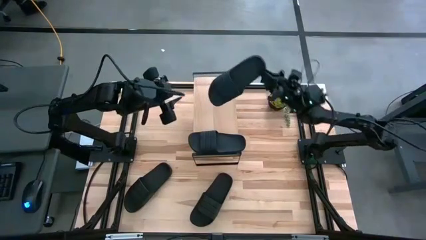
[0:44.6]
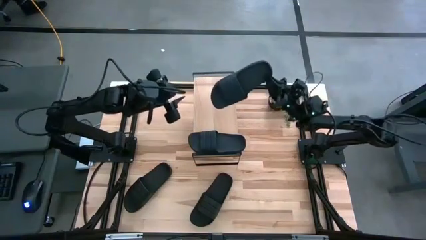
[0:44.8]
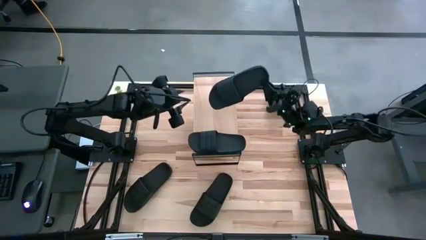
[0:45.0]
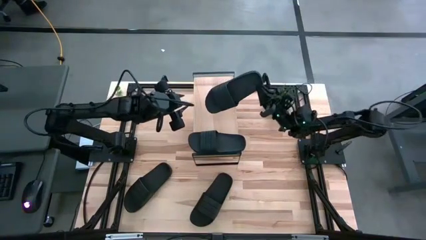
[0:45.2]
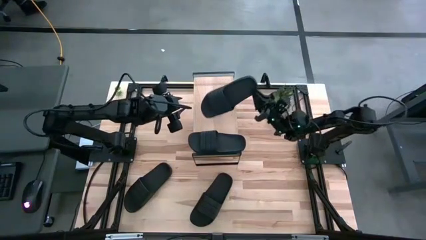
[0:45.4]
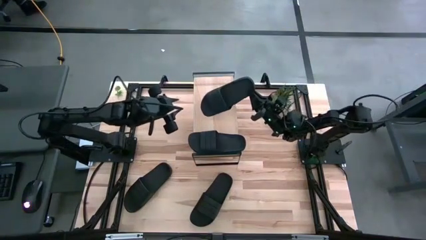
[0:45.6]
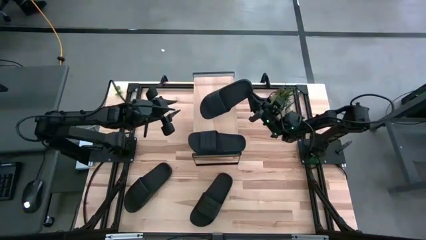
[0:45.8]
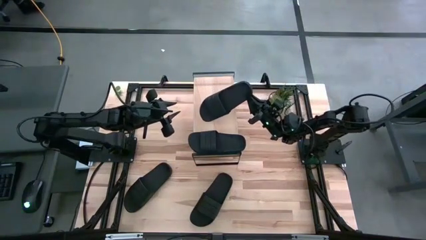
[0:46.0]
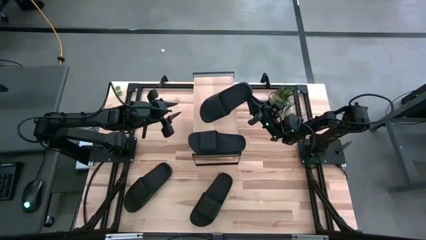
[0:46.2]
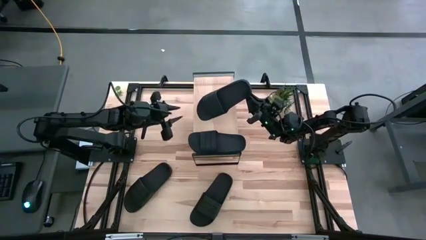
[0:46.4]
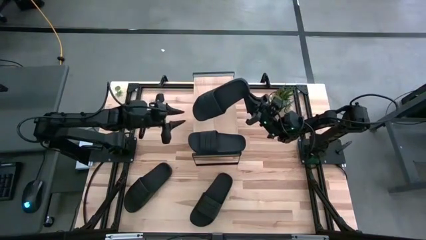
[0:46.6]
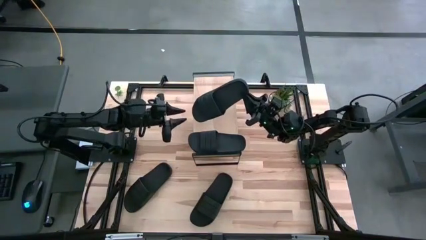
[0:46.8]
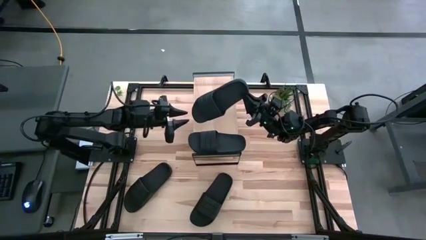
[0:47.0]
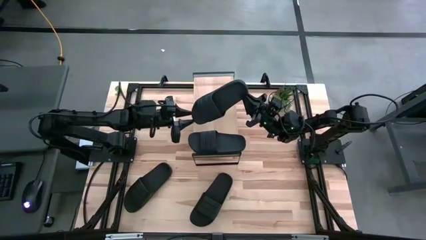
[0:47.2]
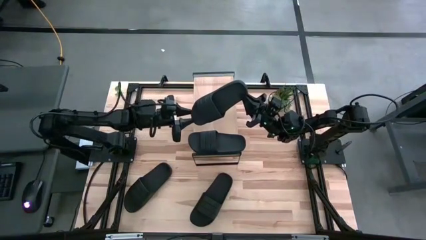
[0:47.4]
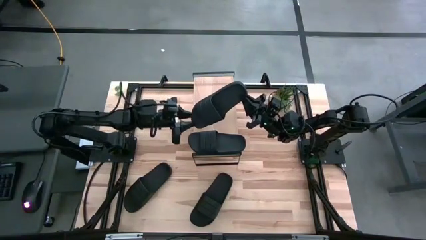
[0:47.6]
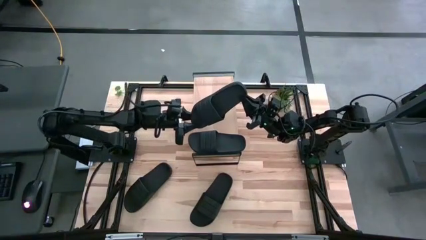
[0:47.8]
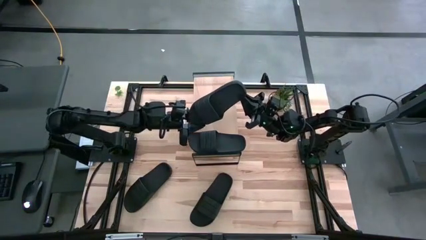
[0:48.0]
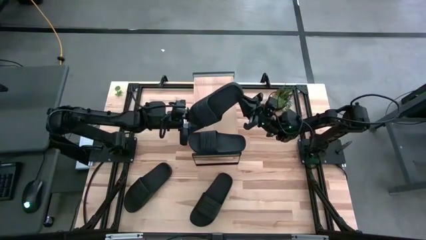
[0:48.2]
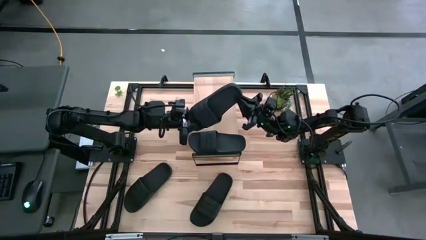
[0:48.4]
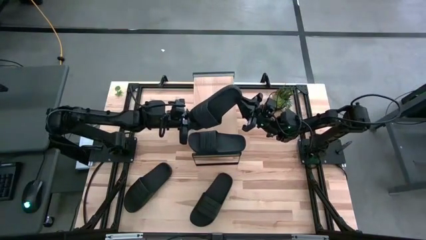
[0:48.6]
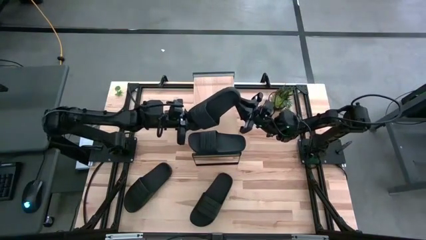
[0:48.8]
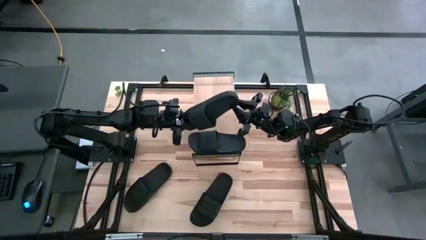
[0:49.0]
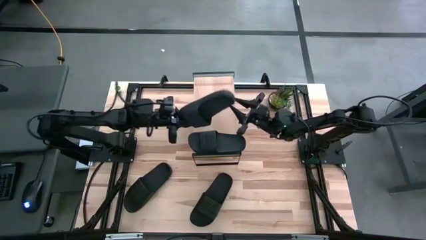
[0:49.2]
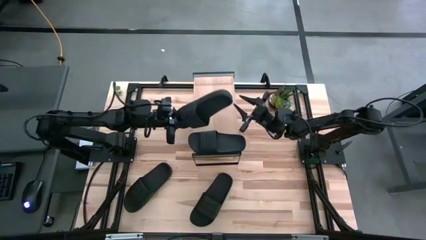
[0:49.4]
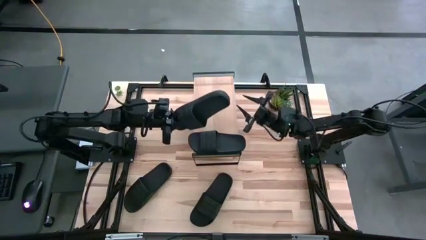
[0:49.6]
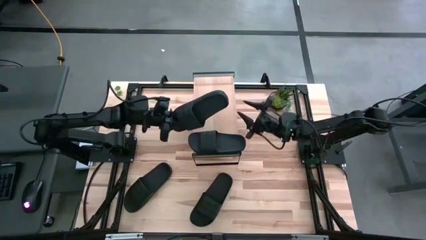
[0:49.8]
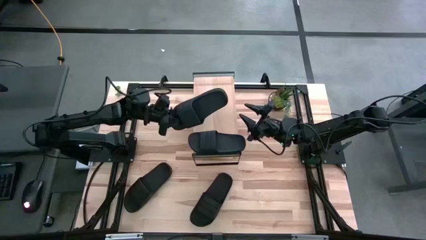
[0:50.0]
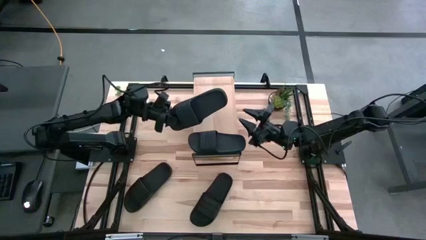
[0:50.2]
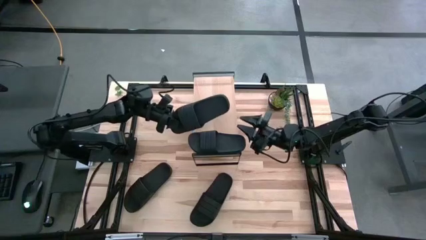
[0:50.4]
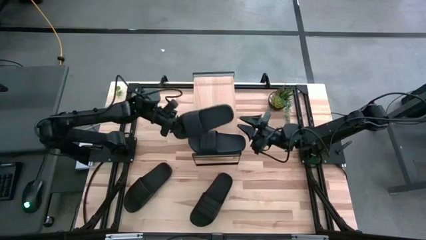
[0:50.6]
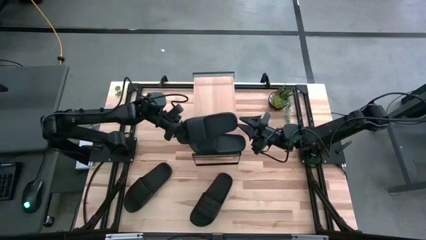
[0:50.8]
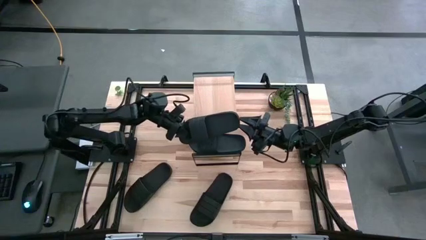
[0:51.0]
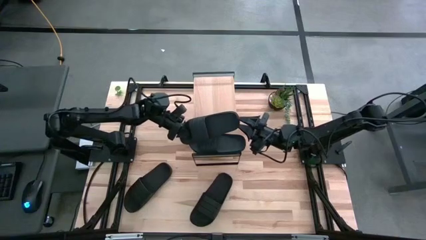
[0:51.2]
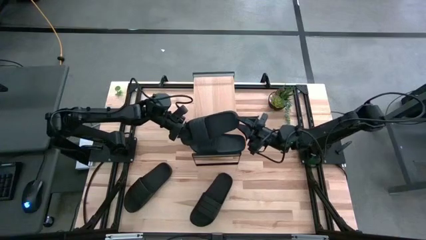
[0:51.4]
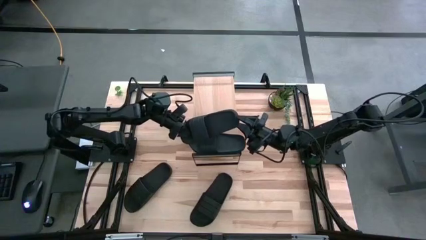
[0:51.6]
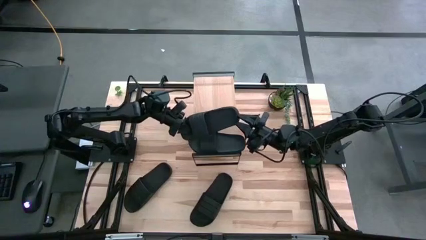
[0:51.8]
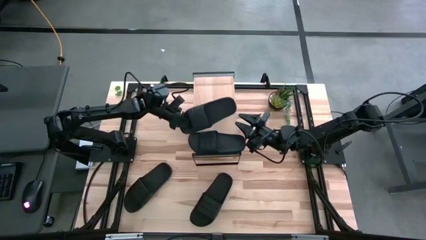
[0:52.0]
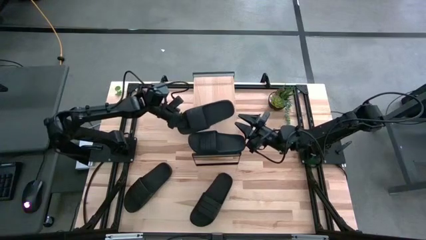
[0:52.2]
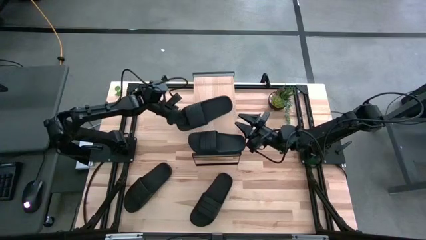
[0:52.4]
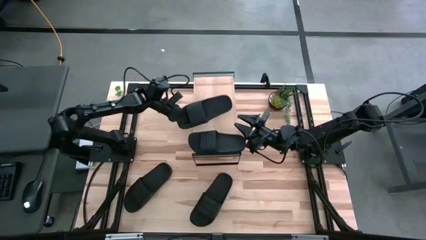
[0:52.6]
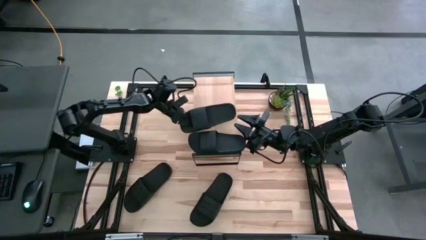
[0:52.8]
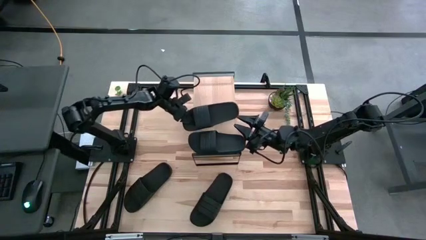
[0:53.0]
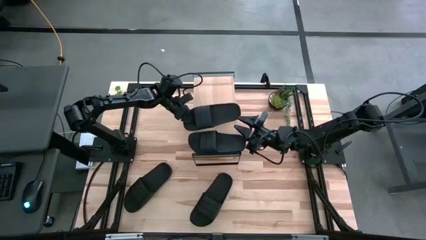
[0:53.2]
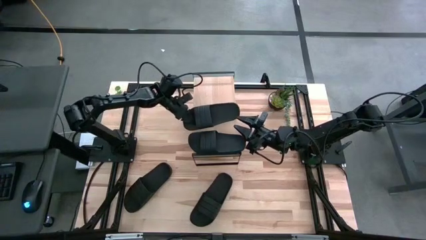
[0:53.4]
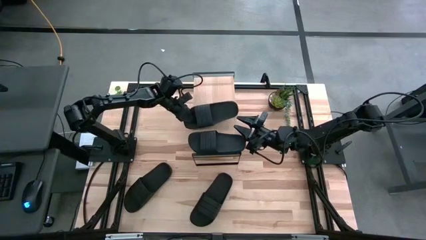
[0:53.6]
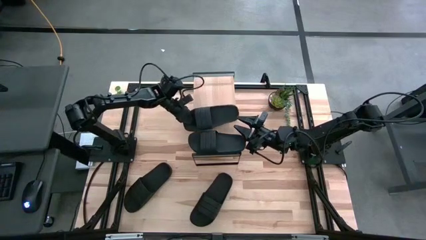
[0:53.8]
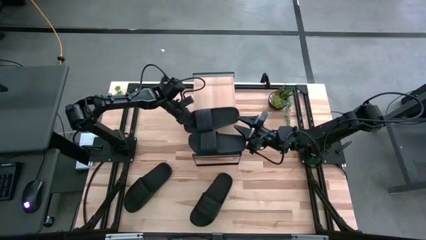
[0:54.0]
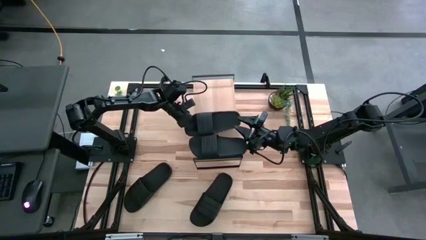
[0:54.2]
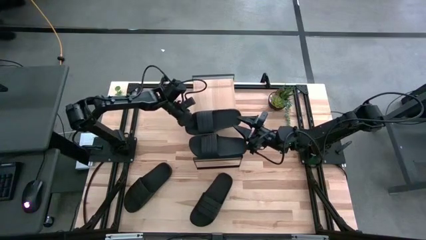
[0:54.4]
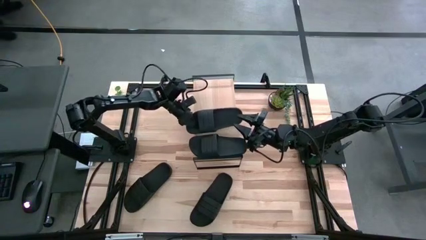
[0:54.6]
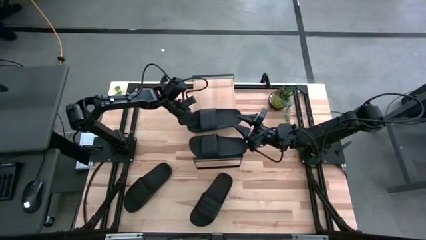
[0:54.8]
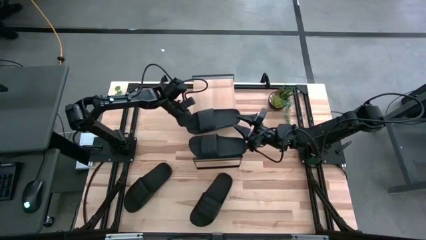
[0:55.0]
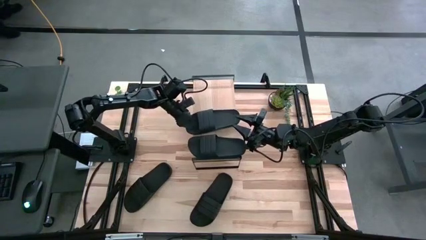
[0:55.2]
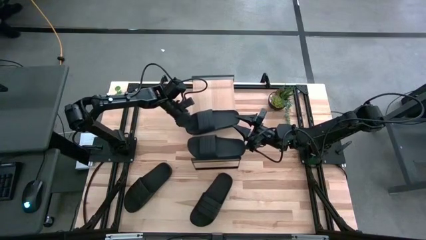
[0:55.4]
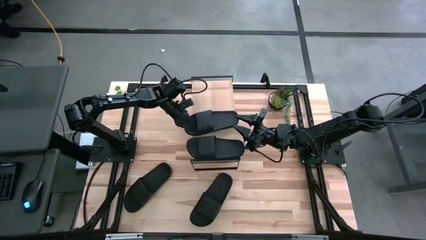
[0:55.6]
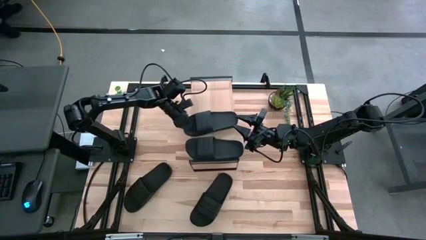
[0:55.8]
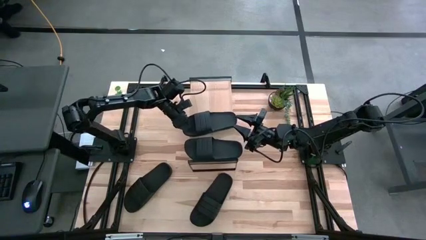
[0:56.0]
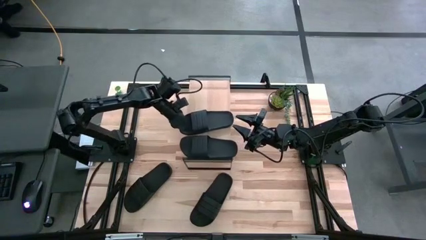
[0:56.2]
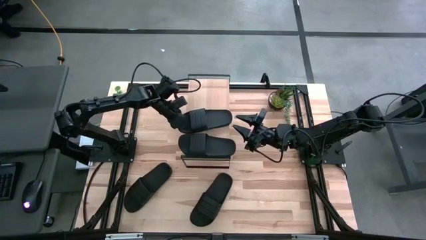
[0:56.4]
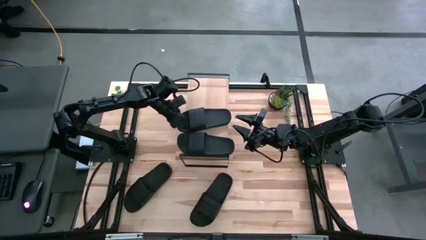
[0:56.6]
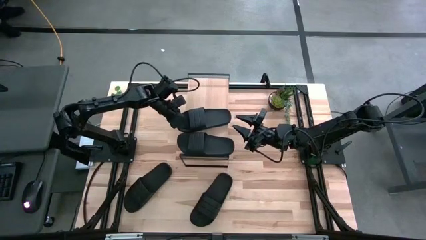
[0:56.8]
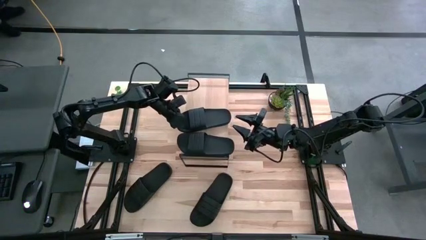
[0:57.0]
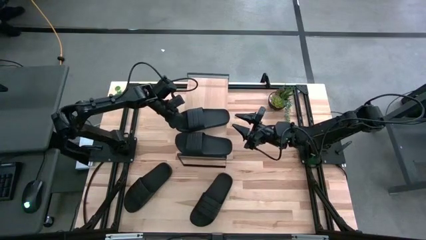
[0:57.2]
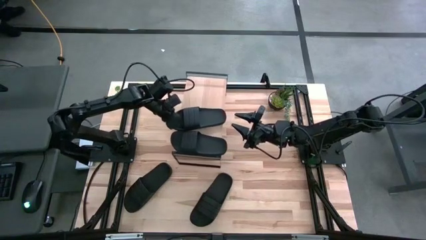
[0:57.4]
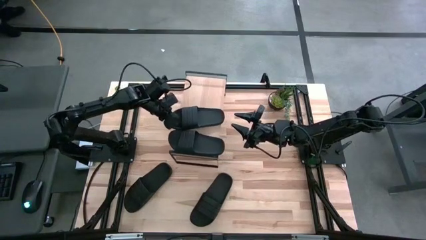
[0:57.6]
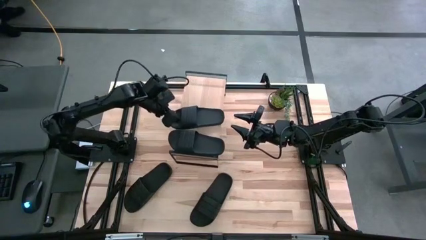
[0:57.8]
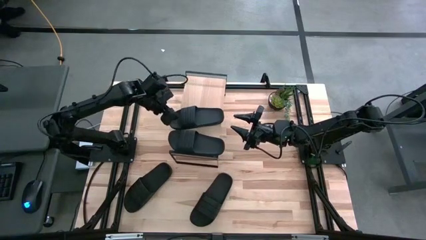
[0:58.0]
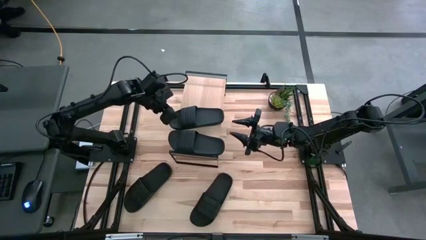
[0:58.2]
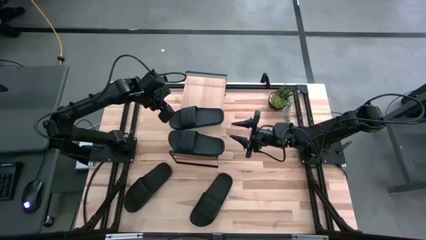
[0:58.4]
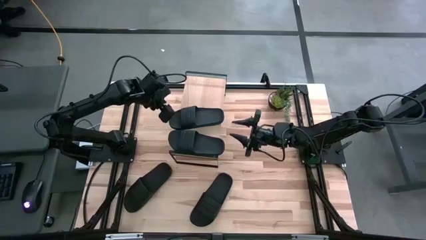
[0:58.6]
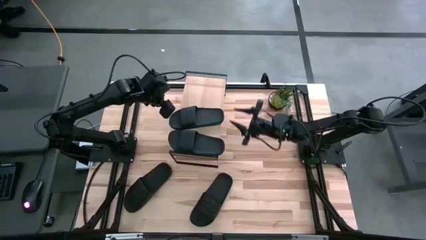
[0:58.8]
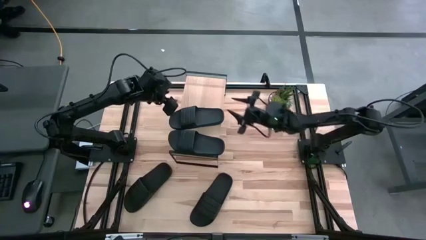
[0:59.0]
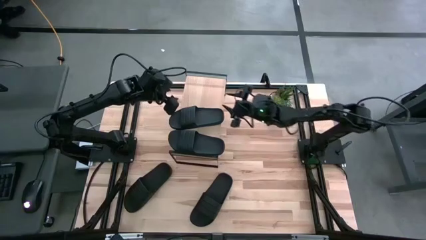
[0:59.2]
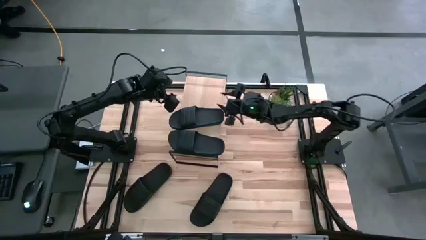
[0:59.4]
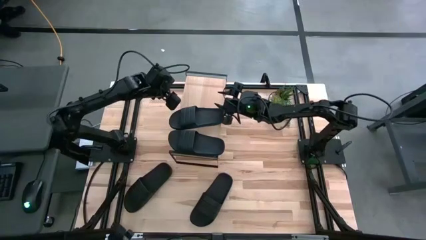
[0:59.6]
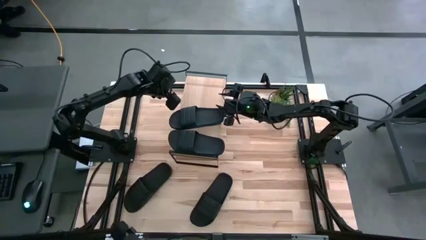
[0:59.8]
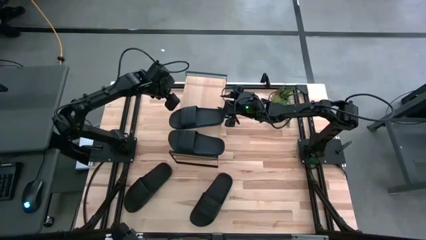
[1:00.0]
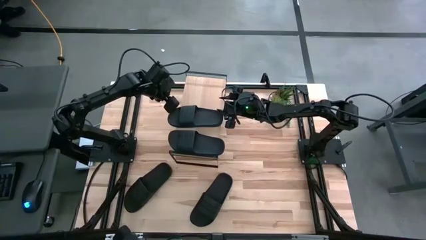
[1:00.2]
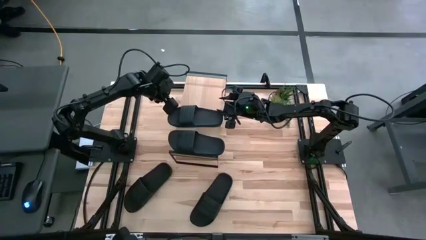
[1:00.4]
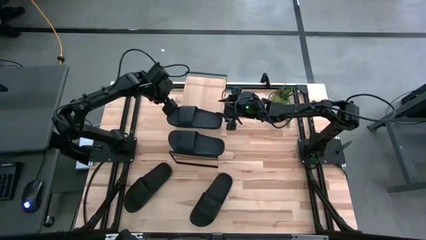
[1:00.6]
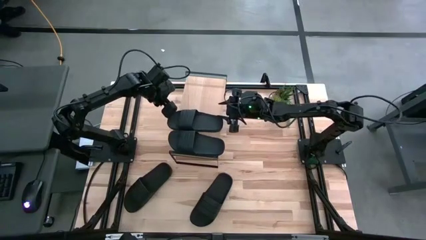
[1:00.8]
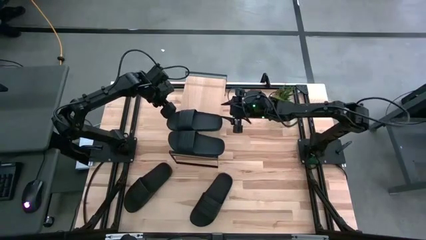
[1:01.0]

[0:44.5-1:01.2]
Task: Pick and place slides into the shelf
Put the top left slipper on the shelf
